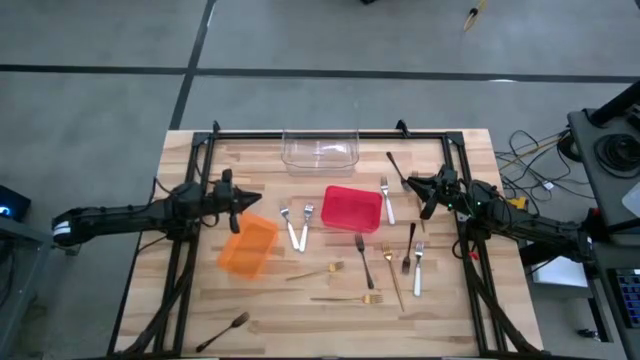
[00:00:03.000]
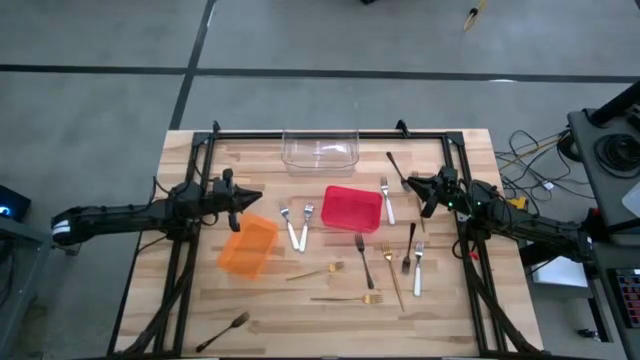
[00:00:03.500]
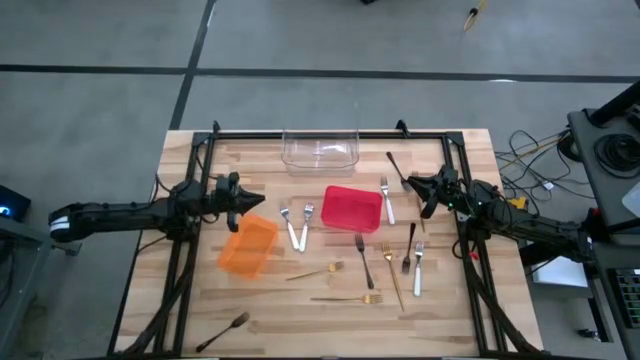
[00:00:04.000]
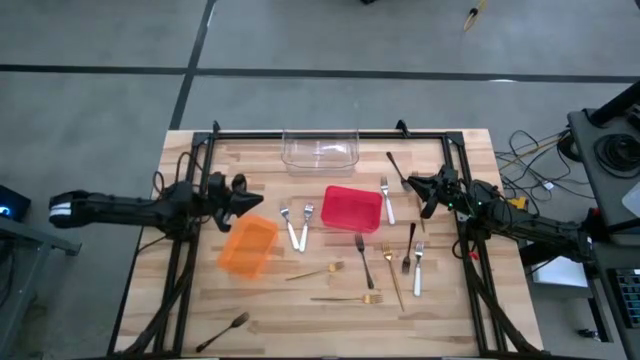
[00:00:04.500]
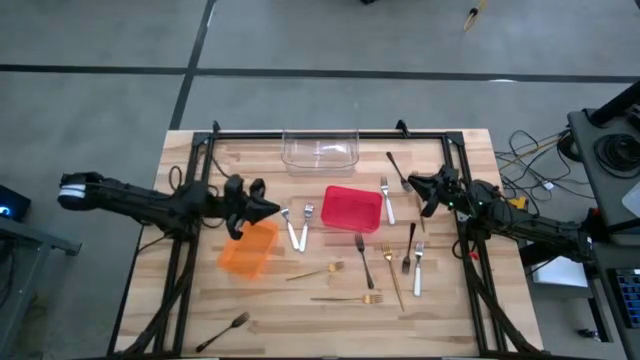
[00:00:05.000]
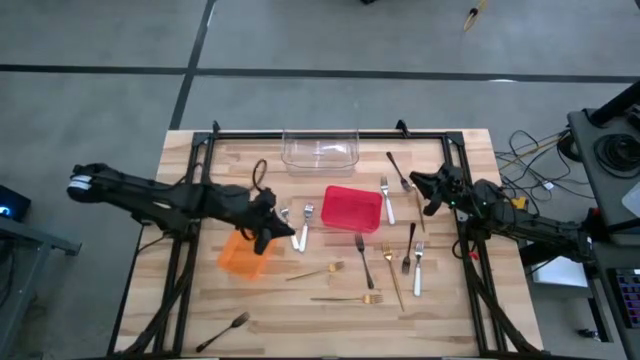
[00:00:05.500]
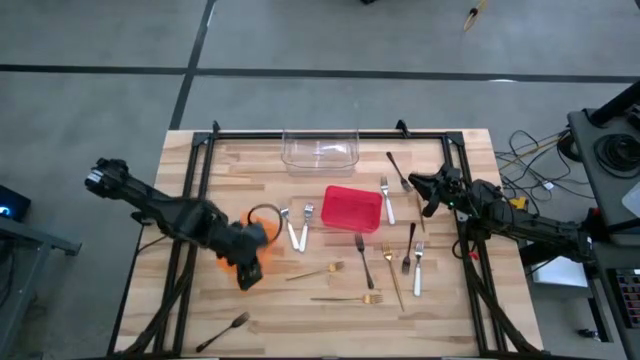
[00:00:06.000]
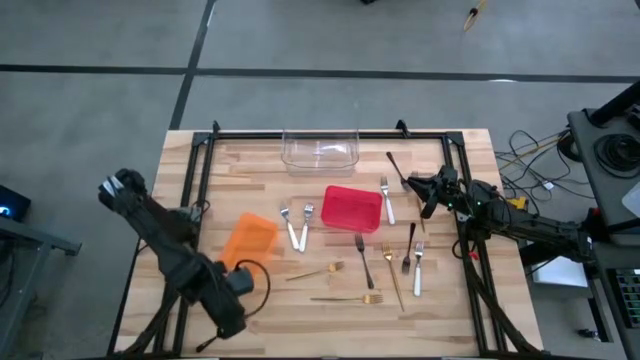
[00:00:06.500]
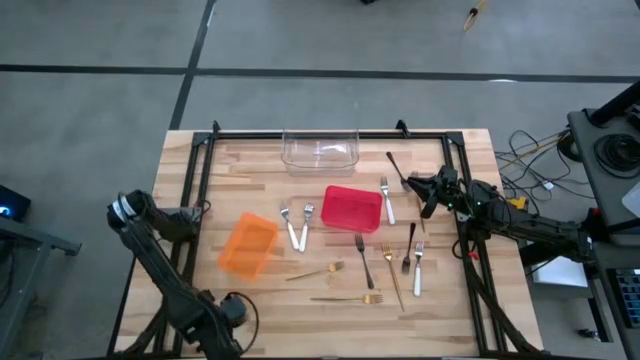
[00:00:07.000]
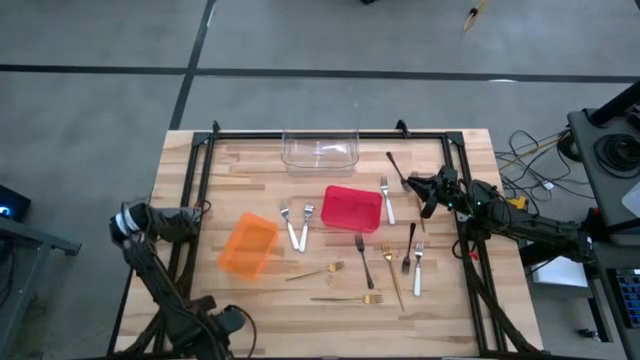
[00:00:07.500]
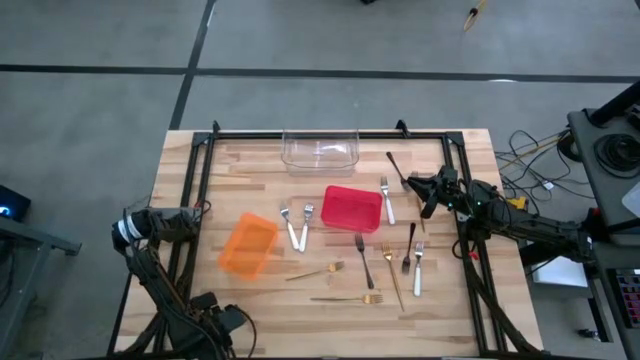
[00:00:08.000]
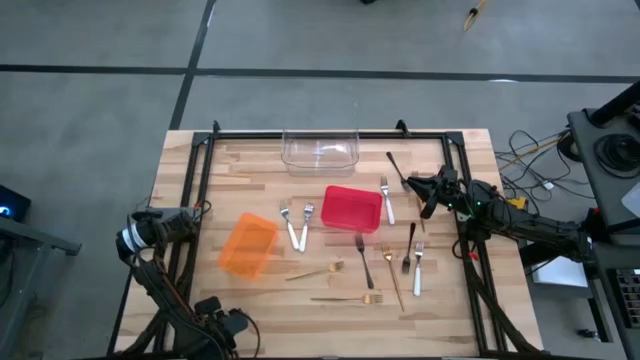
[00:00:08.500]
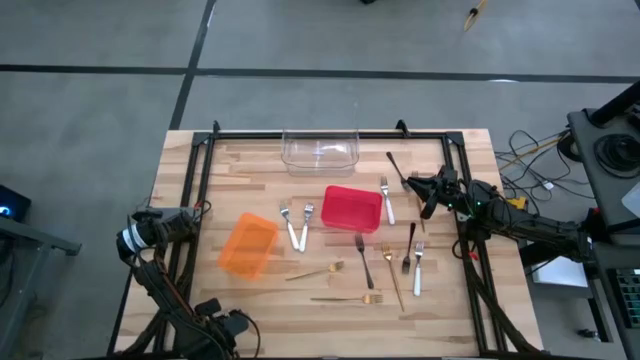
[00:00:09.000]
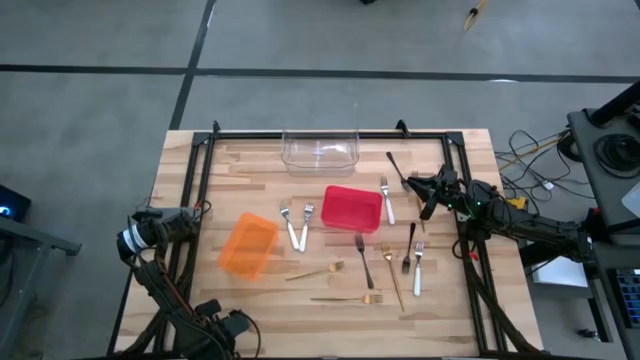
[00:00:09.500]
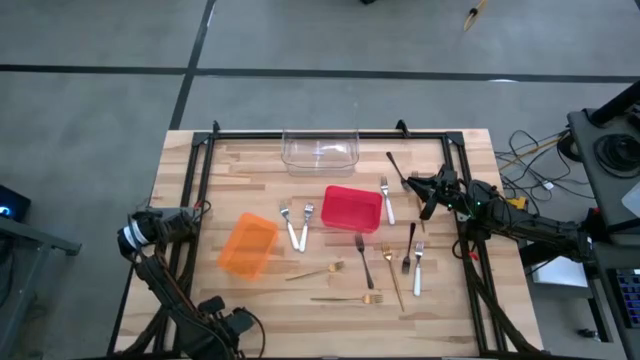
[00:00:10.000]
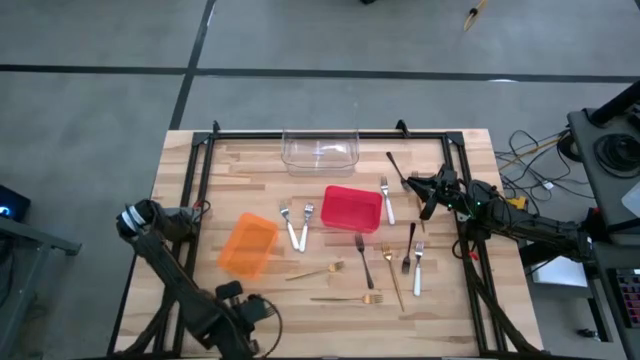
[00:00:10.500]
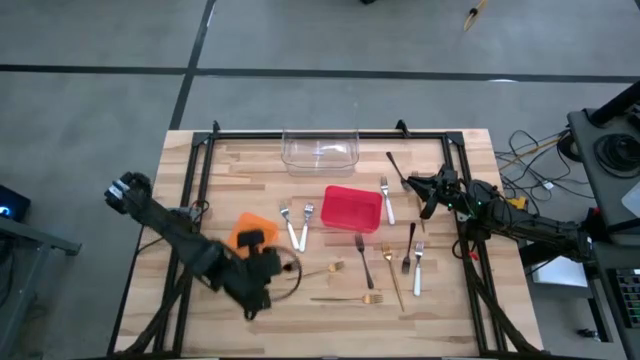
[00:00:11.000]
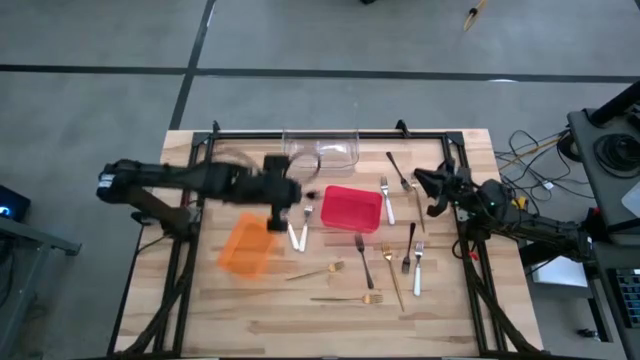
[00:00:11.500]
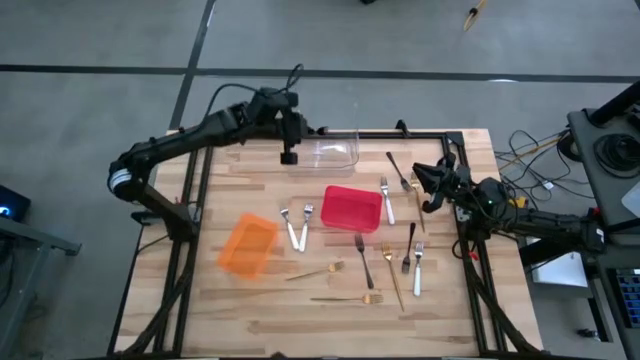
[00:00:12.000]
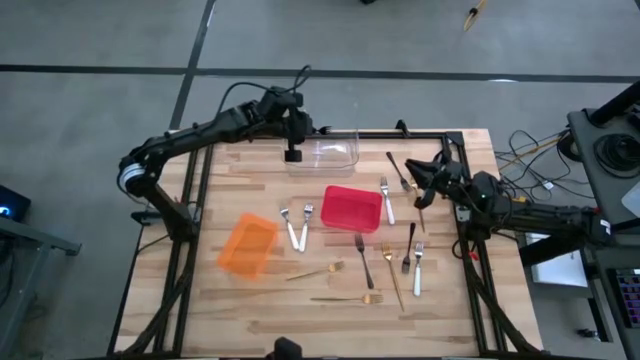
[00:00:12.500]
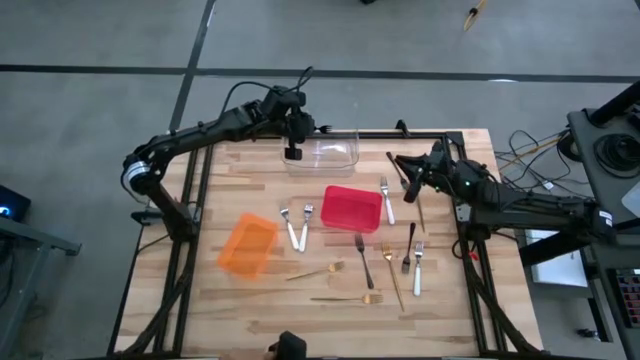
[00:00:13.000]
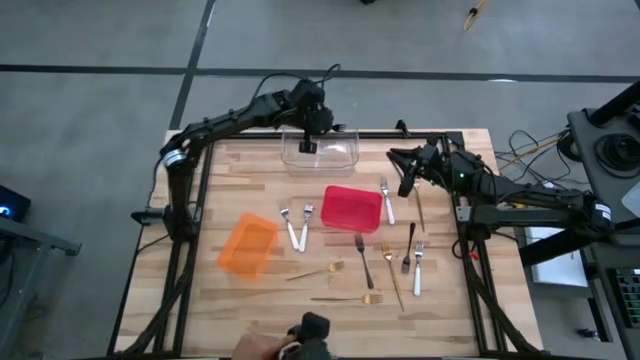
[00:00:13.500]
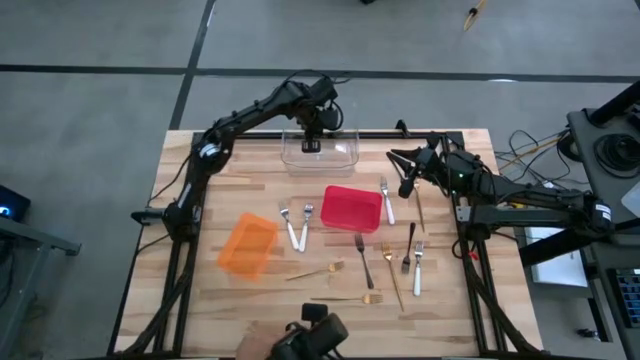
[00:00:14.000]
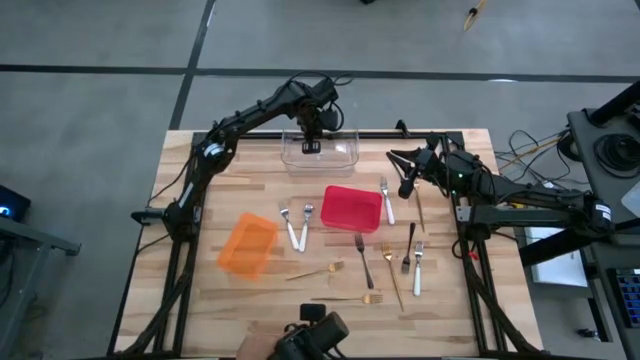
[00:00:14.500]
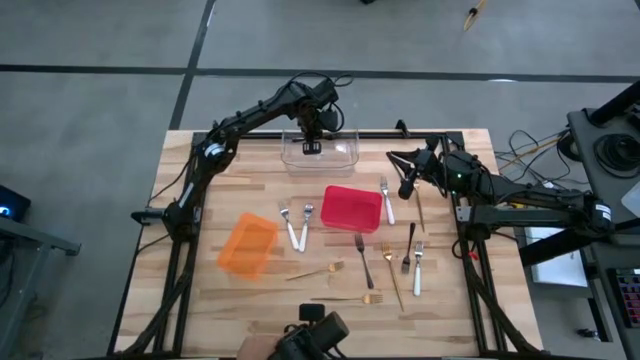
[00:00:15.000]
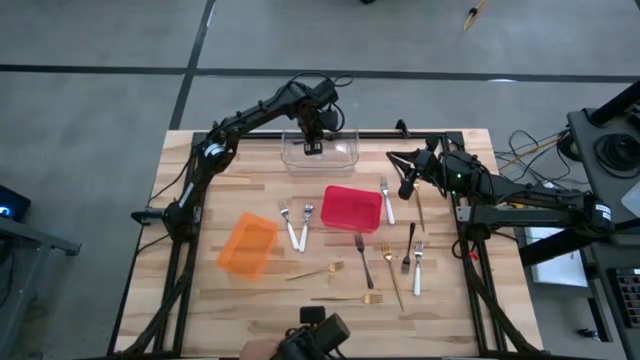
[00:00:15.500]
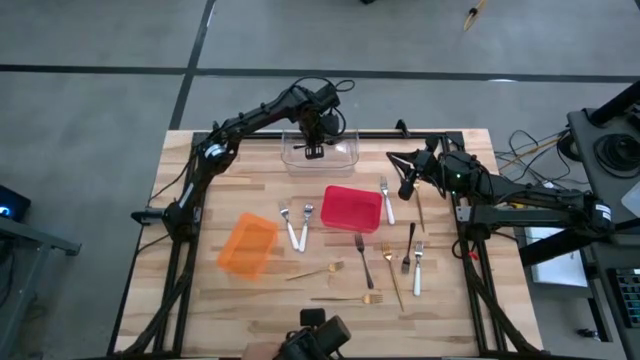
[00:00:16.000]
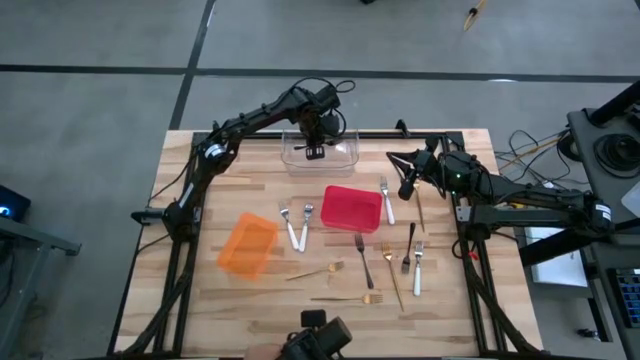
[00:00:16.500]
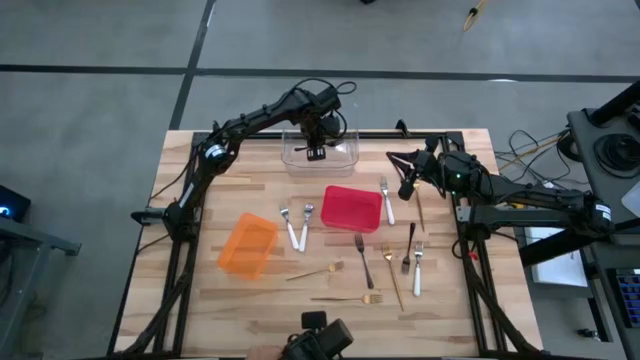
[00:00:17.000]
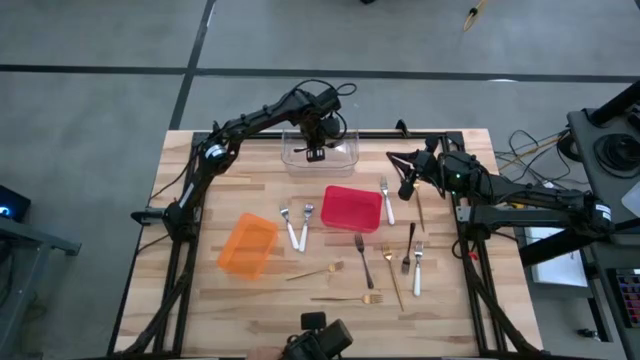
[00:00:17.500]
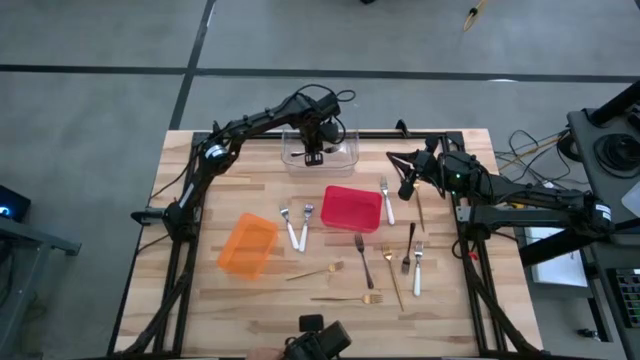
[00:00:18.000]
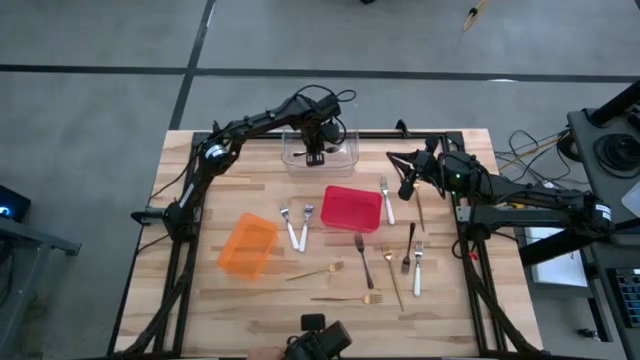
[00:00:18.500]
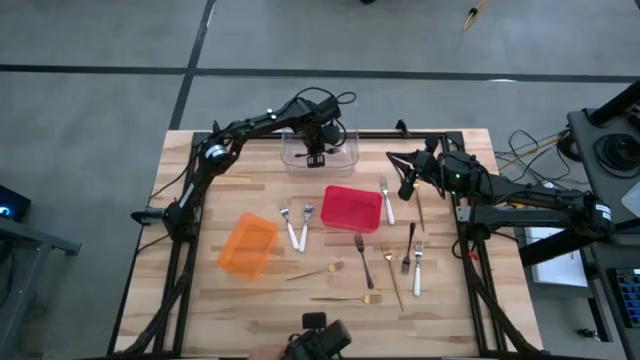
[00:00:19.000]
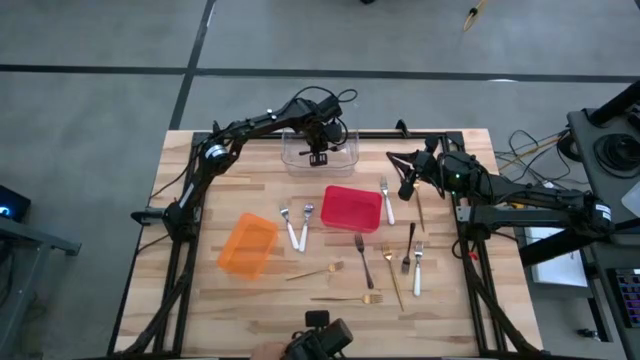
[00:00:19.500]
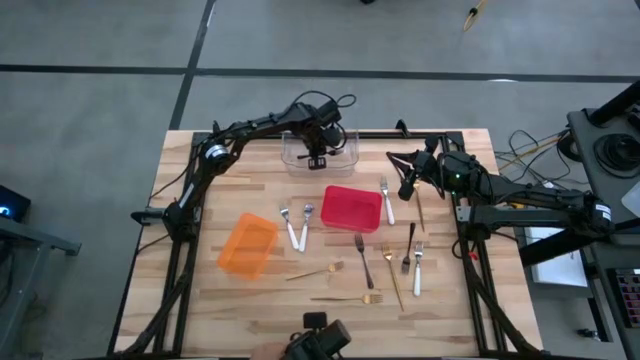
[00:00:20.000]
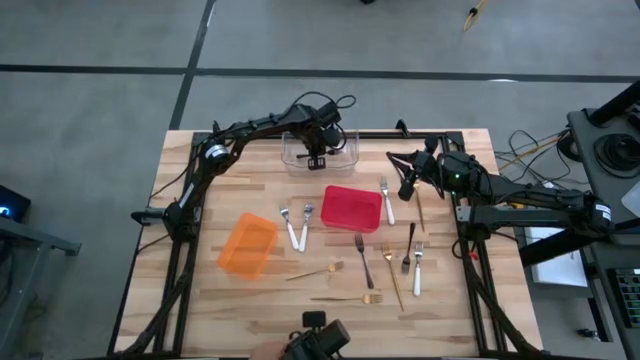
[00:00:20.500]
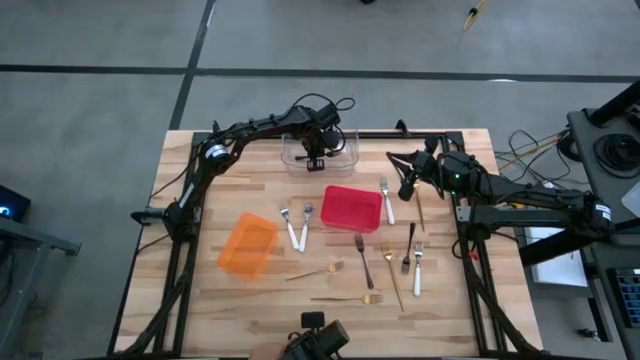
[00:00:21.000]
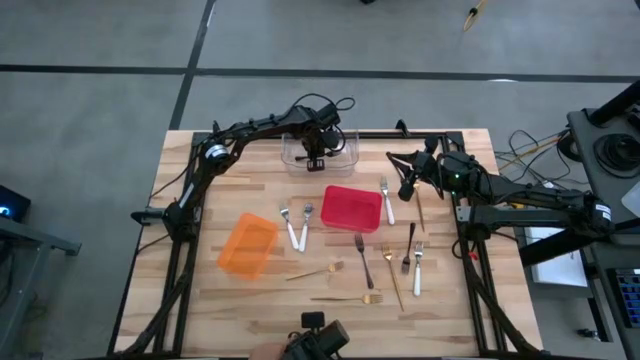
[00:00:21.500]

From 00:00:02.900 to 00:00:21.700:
Task: Sort silverware by color (type)
Put the black fork into the transparent bin
